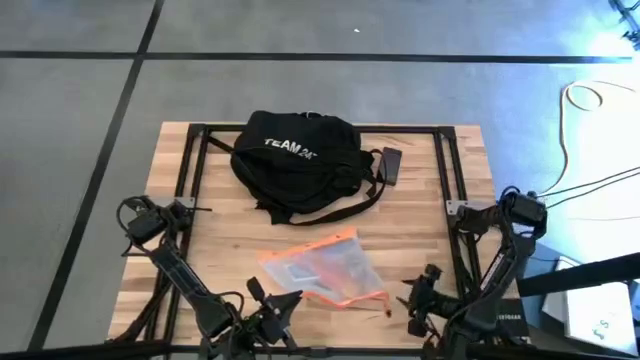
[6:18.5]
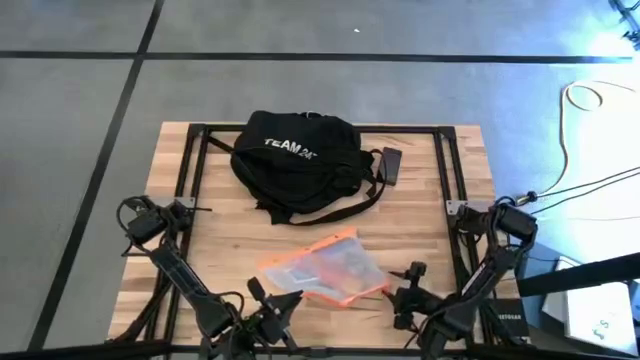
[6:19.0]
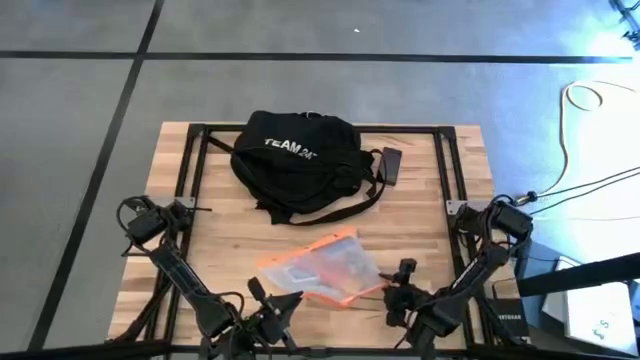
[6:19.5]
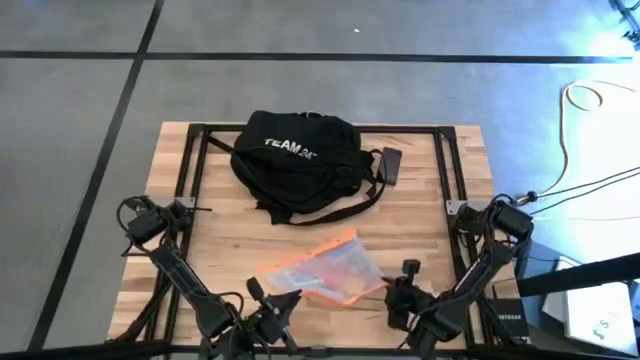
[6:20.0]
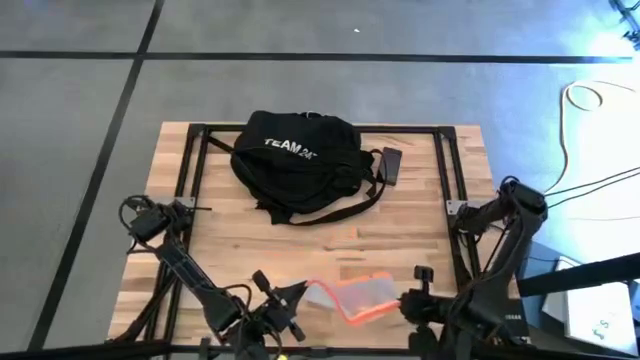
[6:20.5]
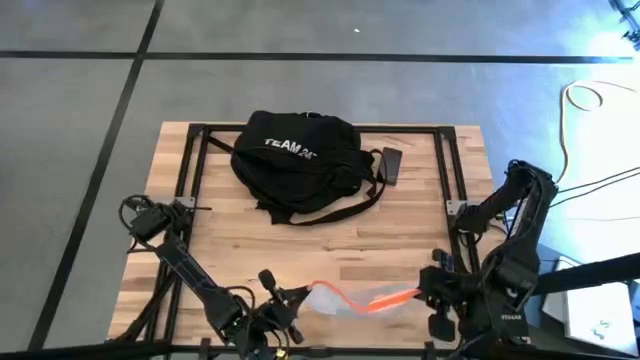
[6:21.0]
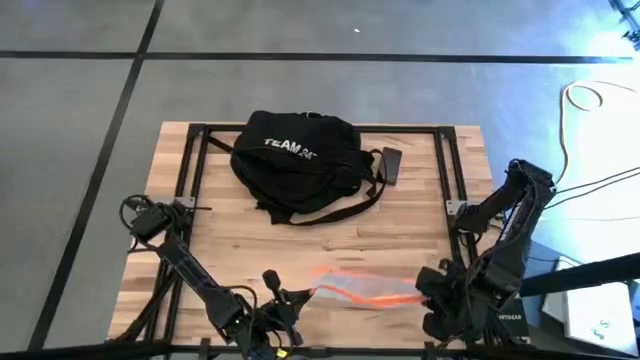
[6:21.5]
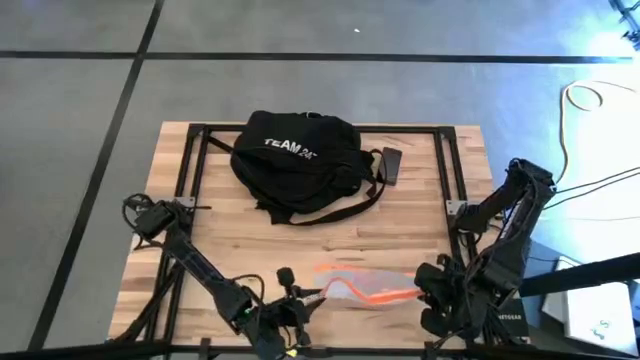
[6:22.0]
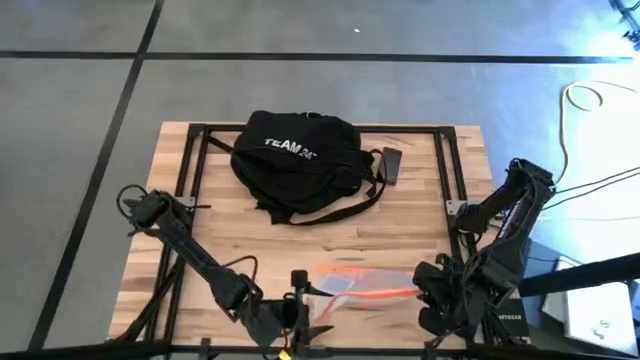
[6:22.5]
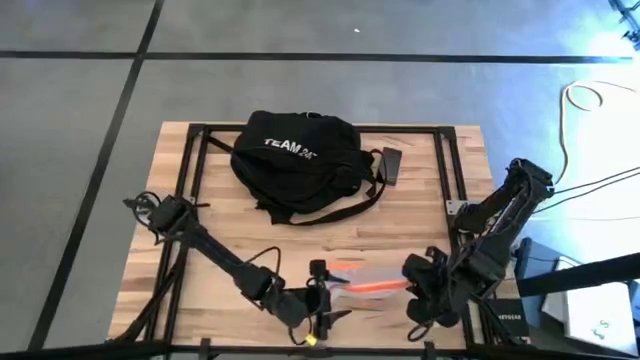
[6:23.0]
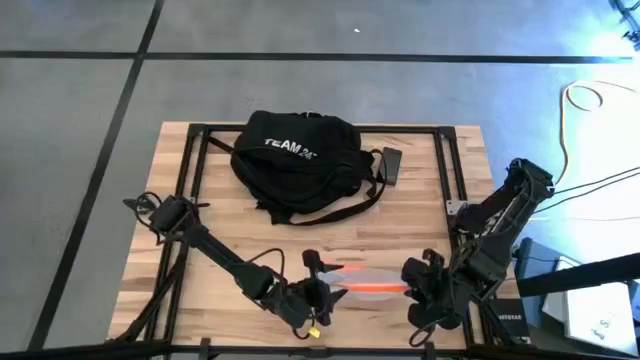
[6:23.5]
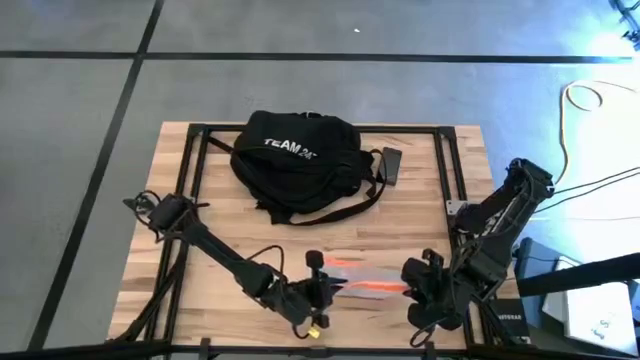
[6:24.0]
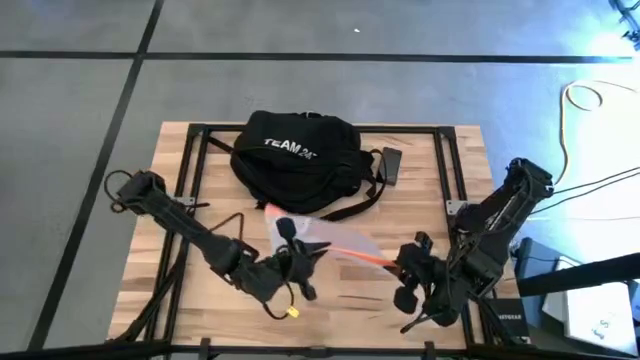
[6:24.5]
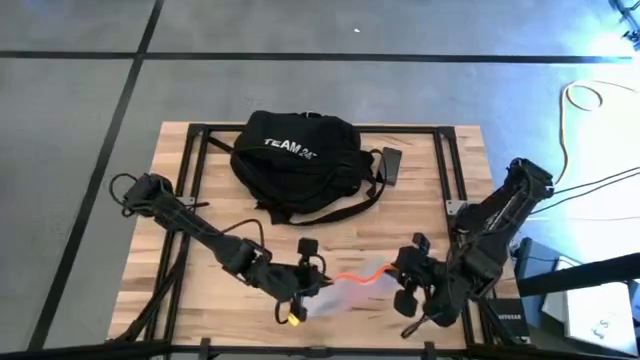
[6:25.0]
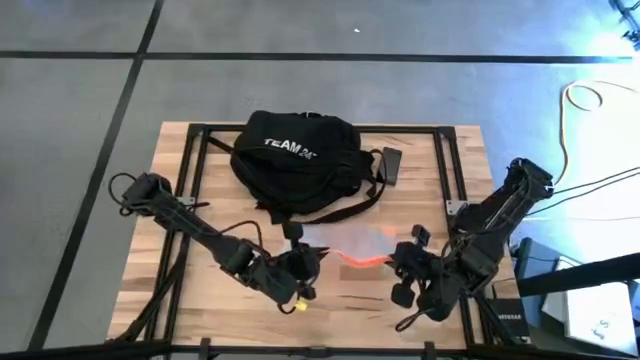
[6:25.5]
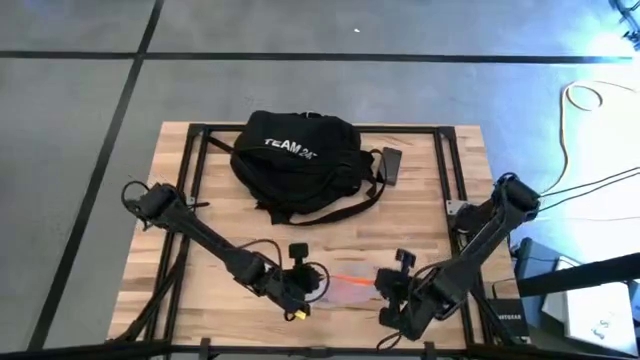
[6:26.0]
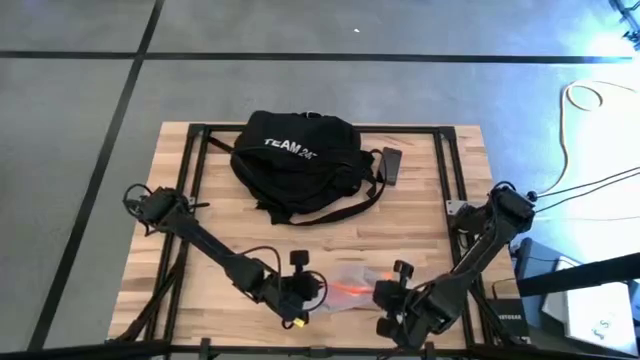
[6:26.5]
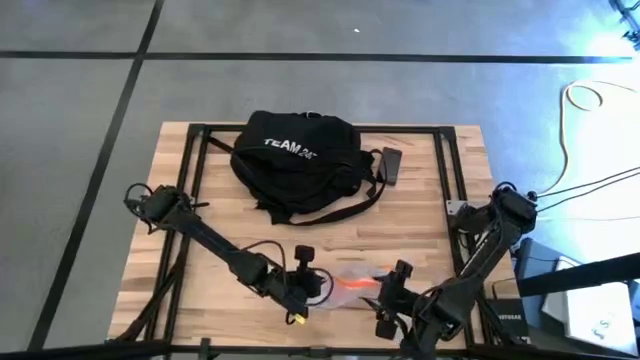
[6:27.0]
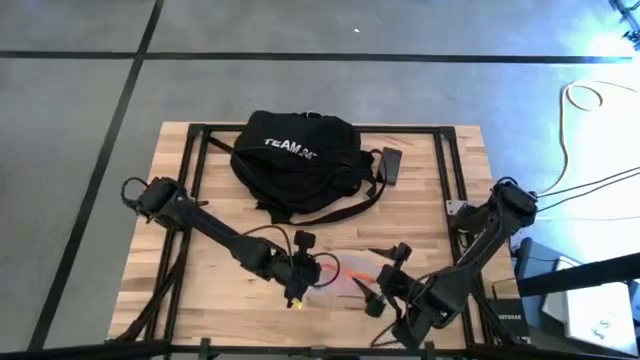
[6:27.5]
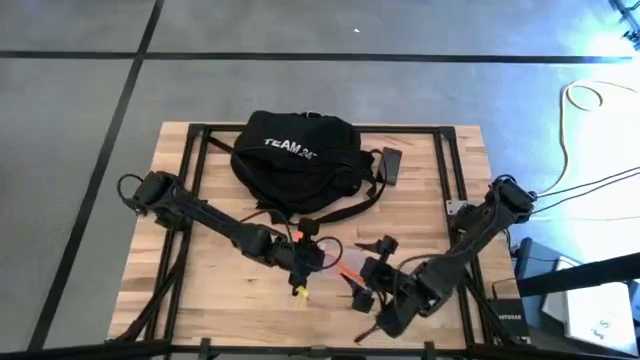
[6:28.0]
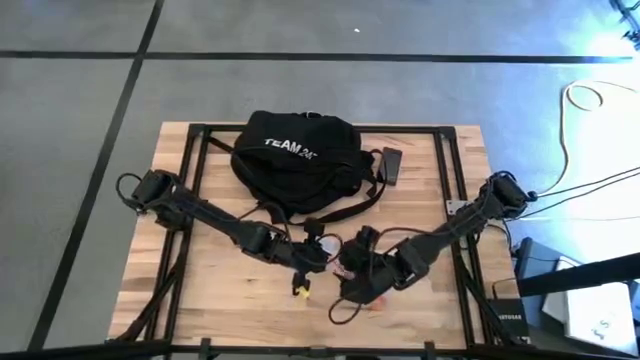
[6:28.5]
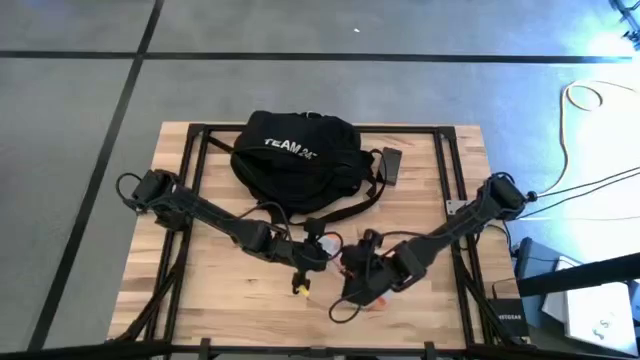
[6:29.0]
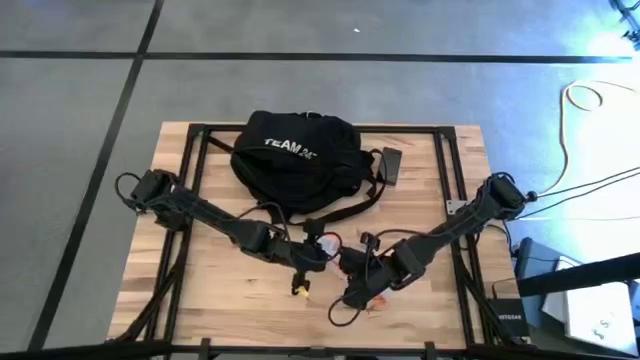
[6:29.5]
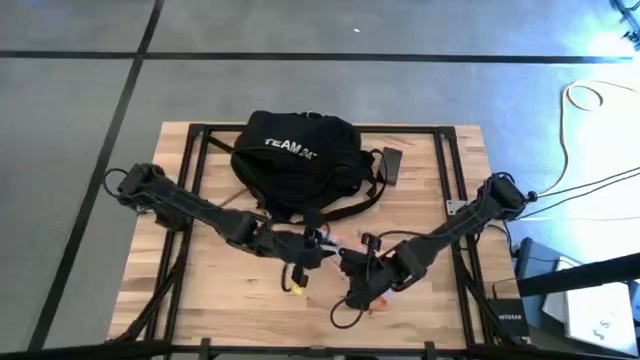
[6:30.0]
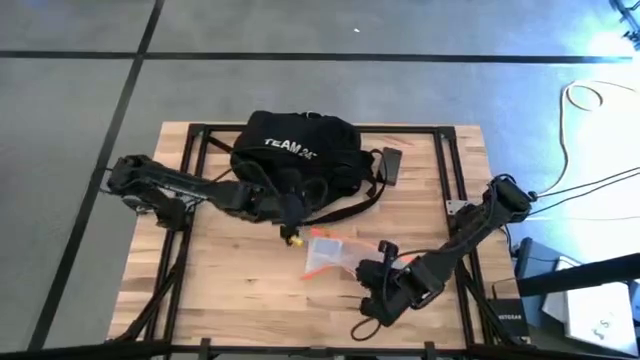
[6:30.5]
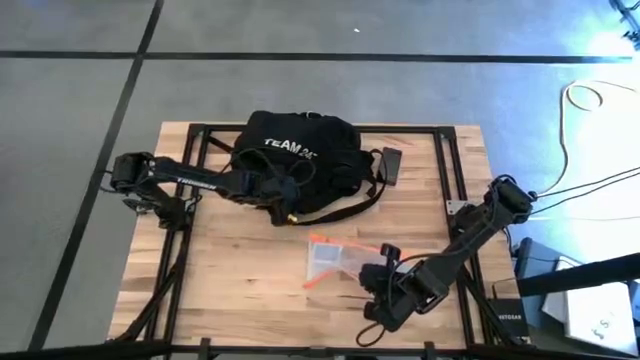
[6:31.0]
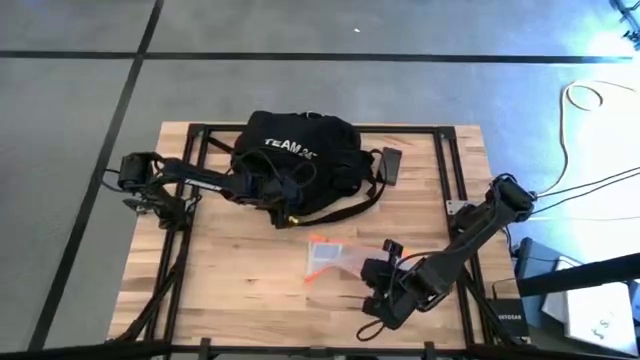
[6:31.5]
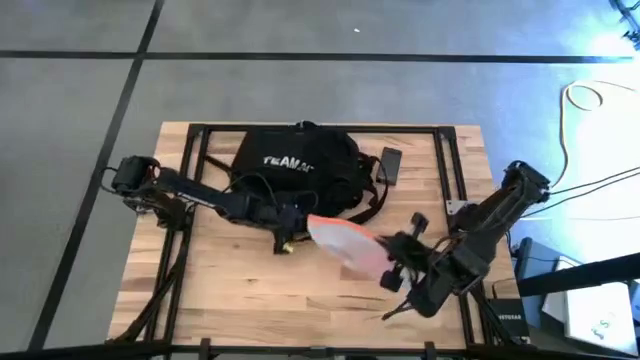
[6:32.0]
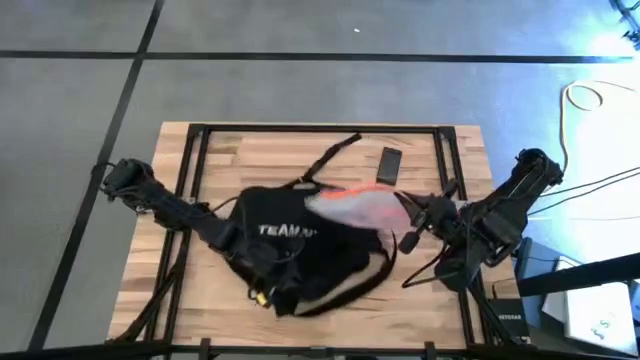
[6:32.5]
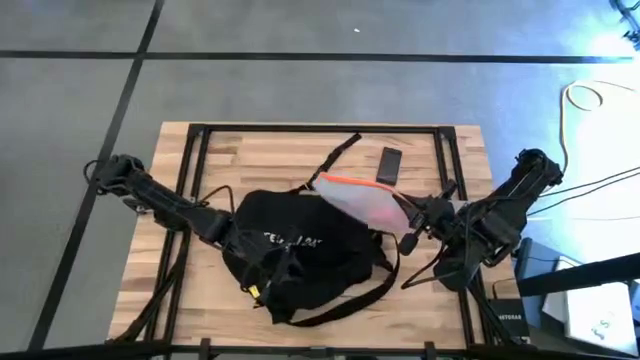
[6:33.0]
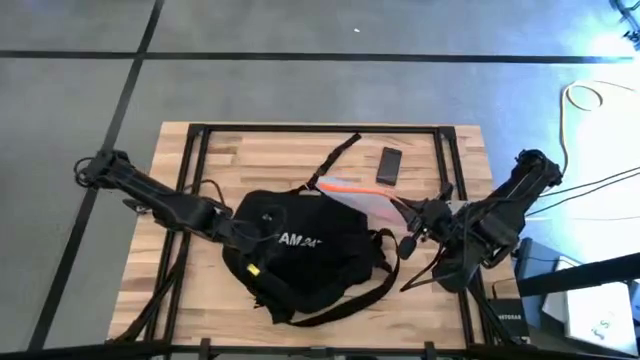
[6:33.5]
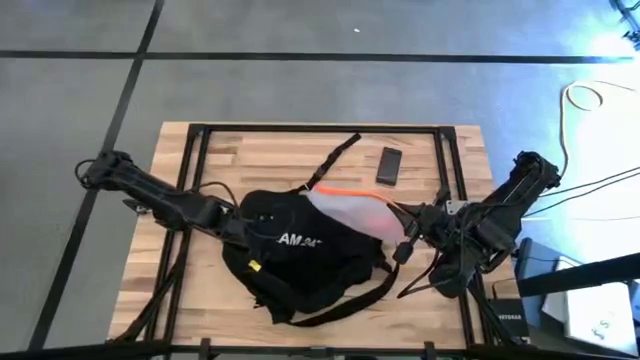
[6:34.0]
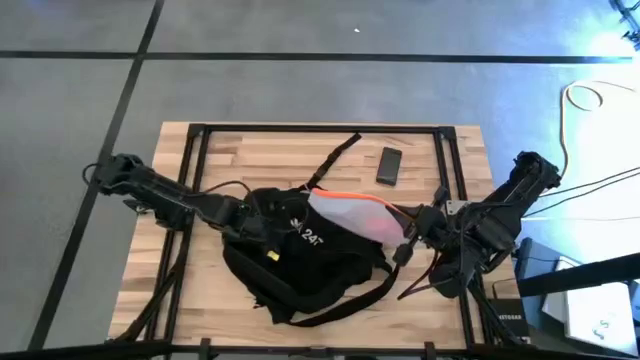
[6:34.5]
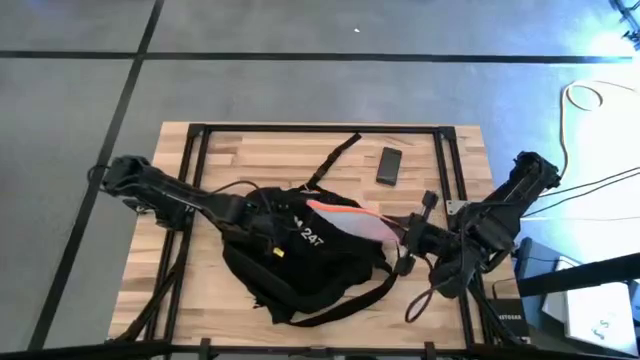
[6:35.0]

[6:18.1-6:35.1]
Task: Unpack backpack
Put the white zip bag into the black bag
